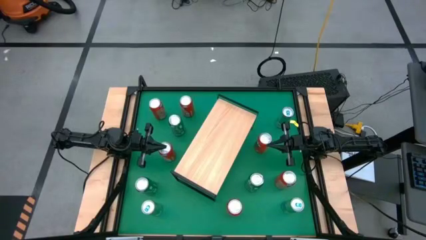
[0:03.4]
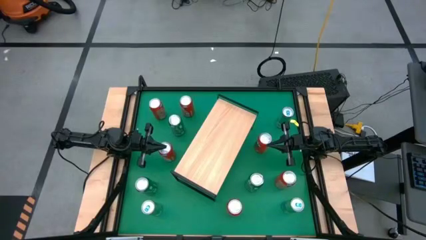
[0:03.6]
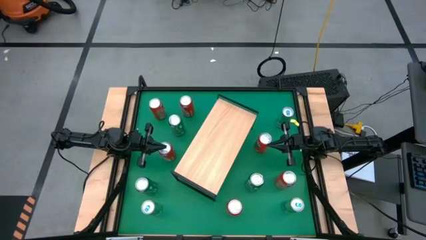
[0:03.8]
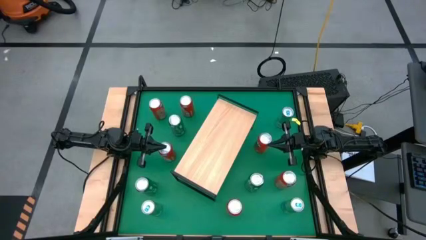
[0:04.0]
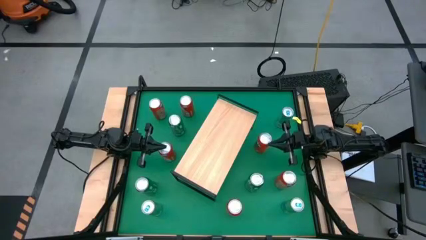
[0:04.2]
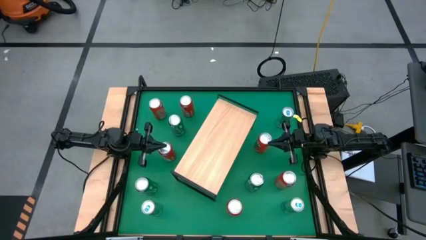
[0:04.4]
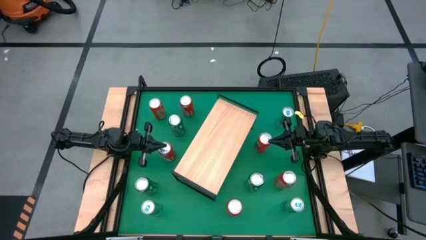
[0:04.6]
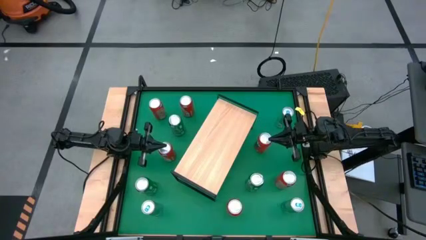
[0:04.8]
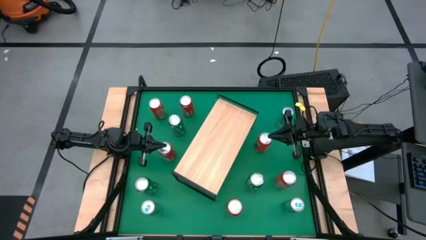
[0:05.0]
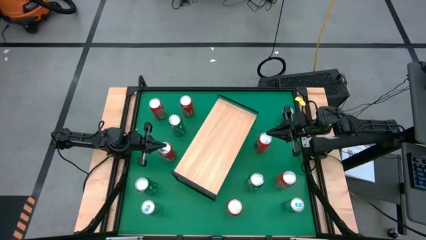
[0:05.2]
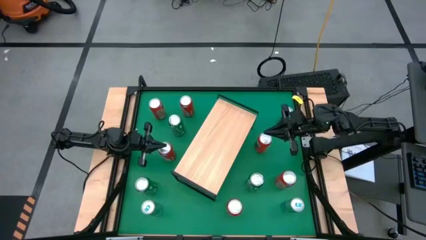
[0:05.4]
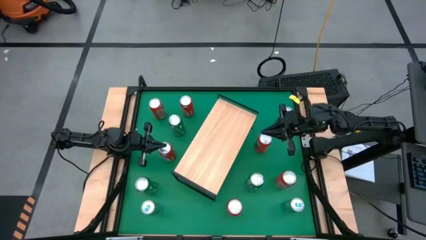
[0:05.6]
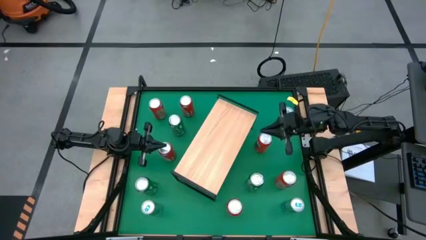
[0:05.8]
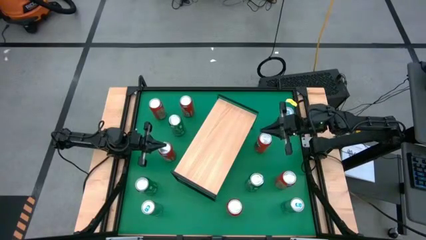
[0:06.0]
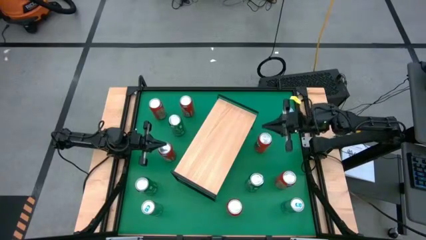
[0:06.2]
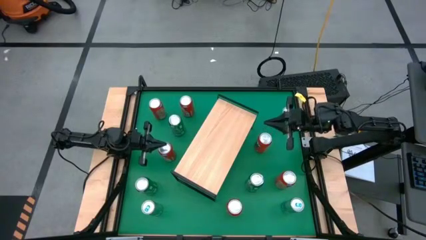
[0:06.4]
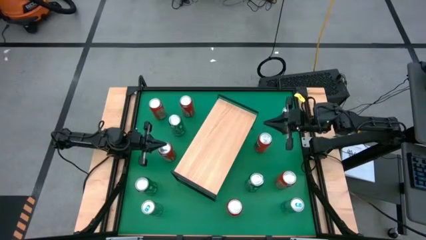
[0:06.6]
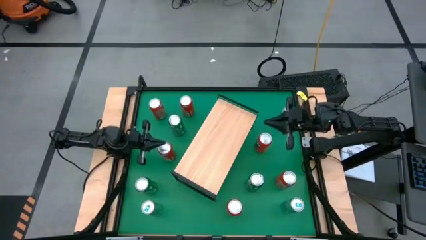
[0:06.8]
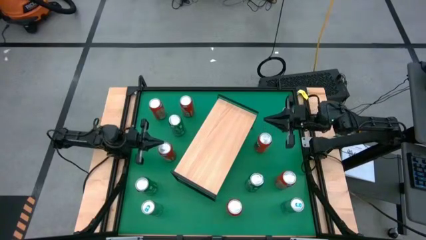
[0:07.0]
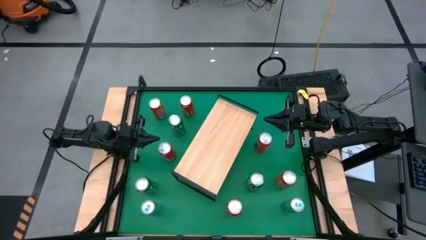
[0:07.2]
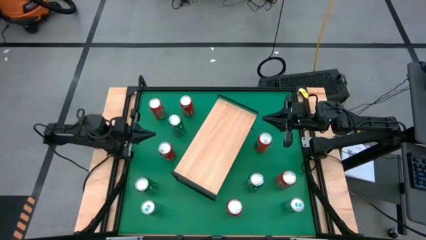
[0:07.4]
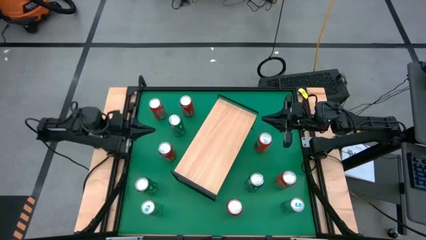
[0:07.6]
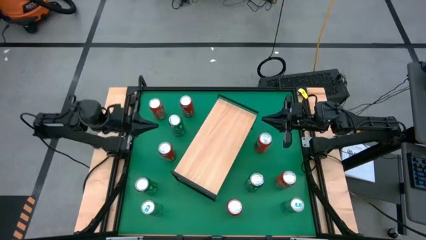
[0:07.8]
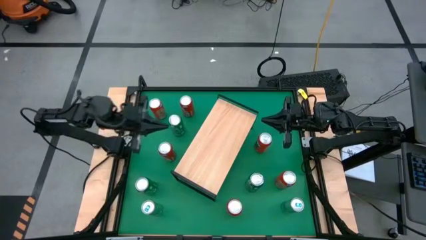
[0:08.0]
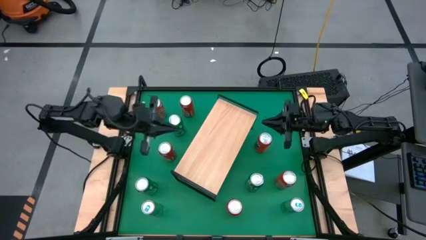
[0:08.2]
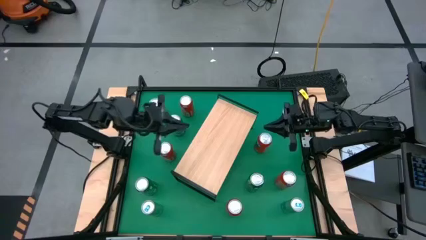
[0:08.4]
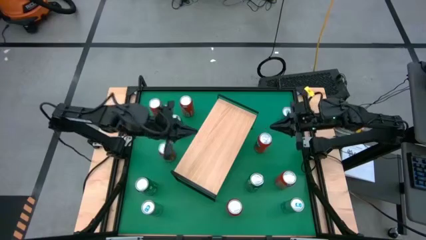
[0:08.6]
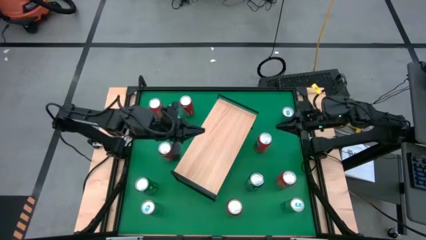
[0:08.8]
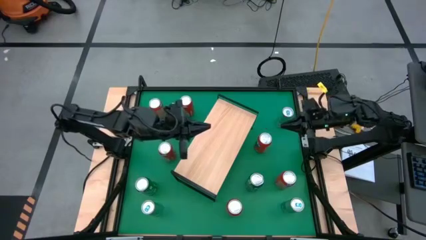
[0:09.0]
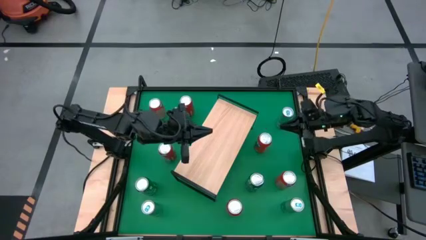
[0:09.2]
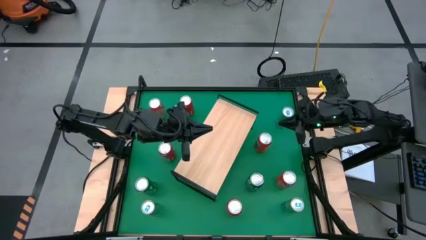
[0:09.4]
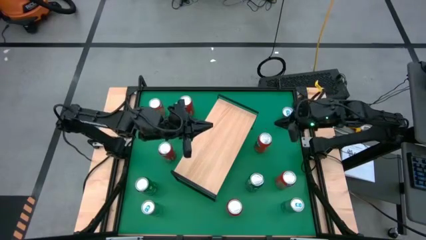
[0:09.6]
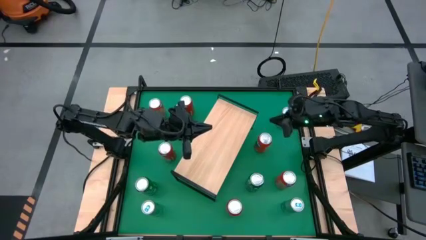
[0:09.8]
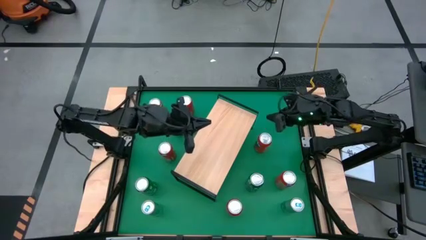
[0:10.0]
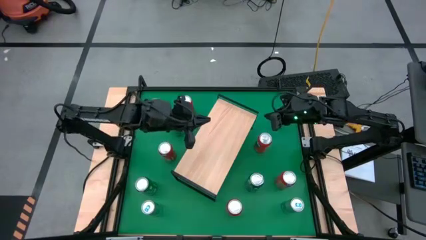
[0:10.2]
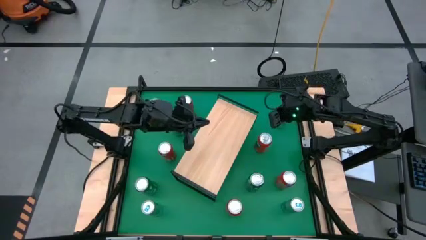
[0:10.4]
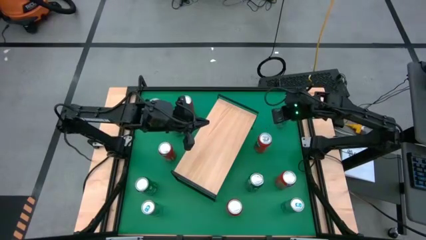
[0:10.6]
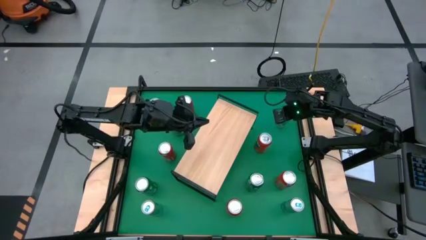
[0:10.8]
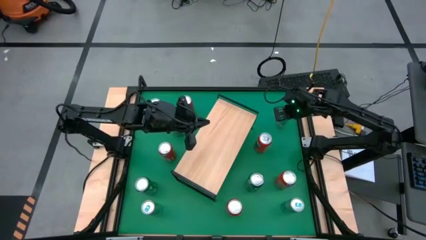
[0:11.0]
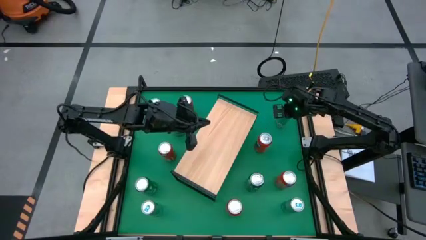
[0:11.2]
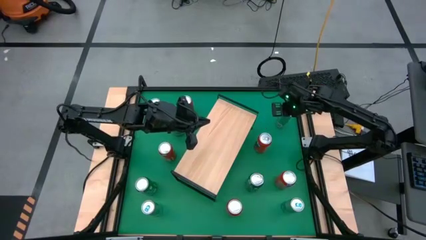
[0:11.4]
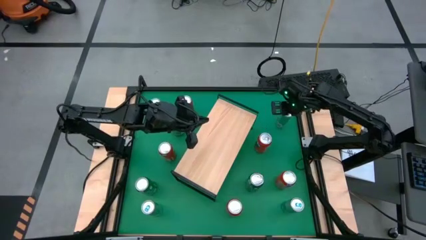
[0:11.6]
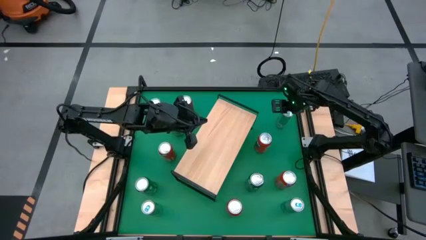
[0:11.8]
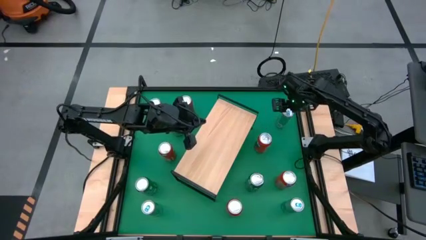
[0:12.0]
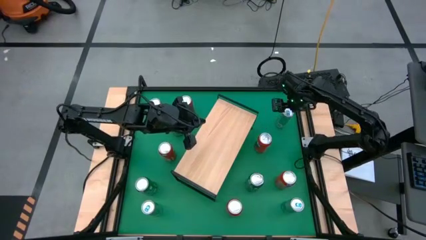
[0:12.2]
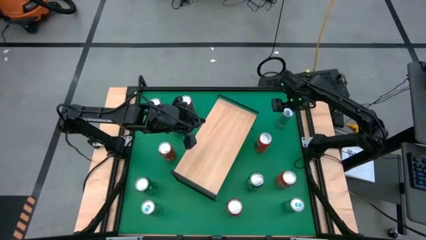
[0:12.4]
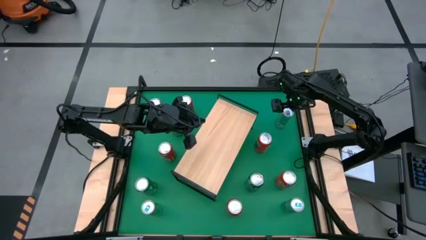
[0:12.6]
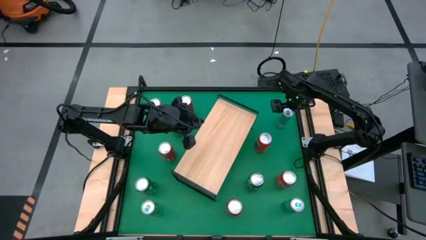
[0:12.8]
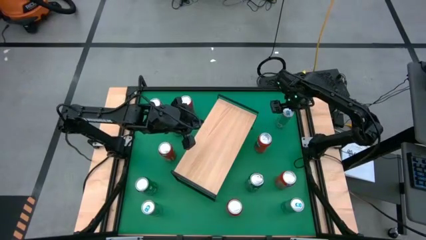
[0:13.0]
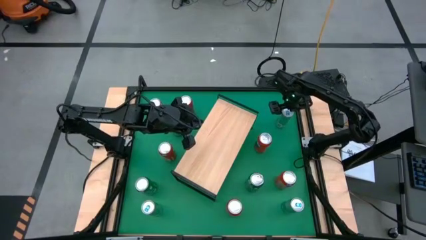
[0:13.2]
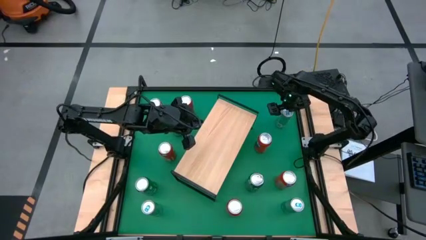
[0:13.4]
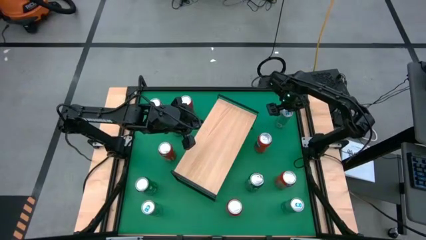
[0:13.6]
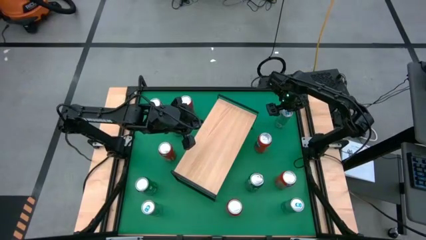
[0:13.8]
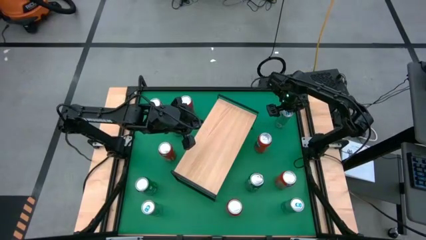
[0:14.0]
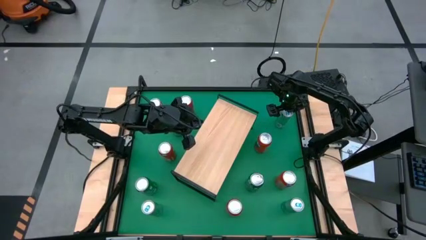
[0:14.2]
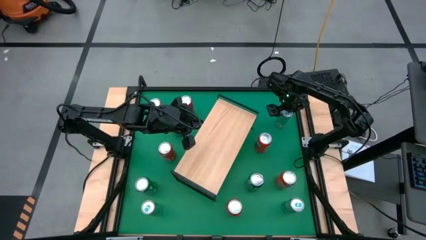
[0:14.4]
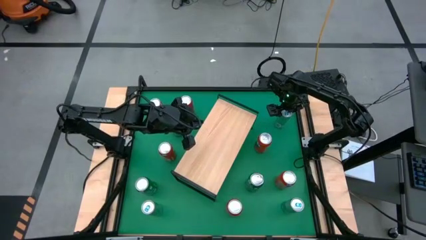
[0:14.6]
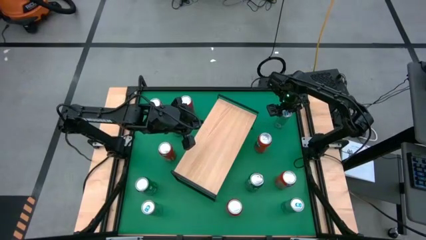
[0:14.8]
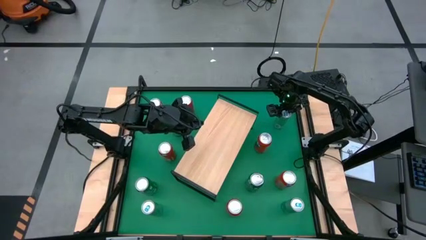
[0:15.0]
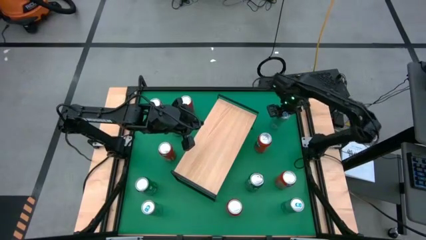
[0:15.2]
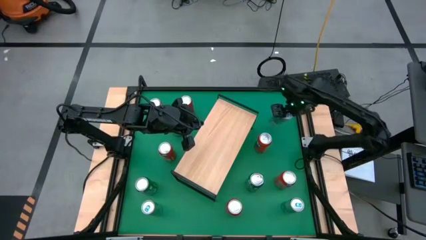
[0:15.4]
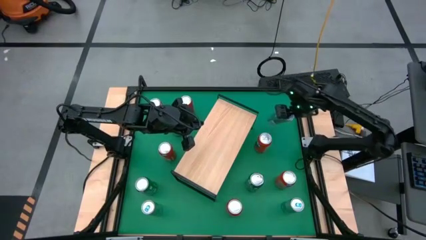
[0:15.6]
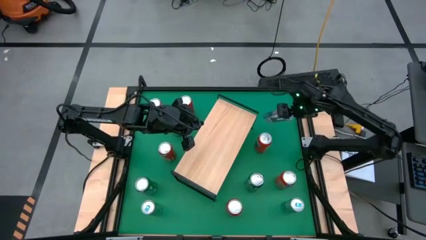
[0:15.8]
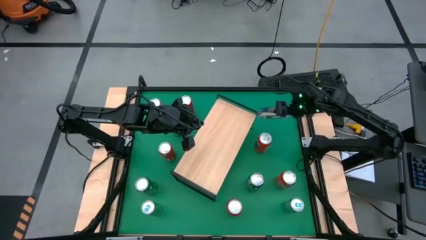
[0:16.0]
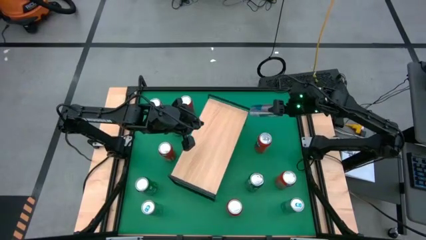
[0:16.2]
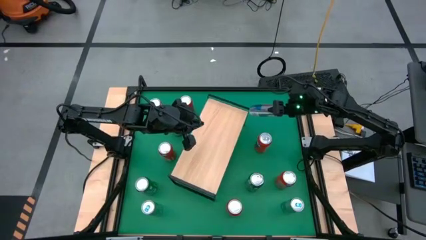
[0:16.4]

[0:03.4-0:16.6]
Task: Sort soda cans
Put the blue soda can on the shelf

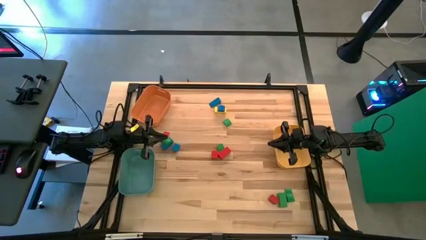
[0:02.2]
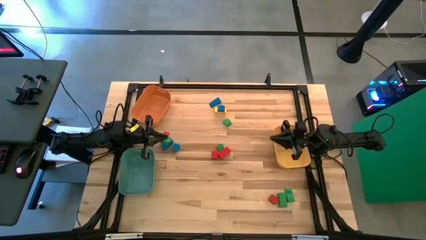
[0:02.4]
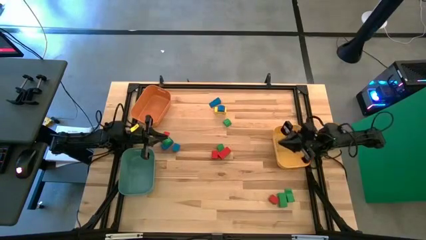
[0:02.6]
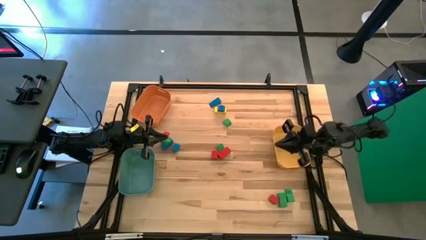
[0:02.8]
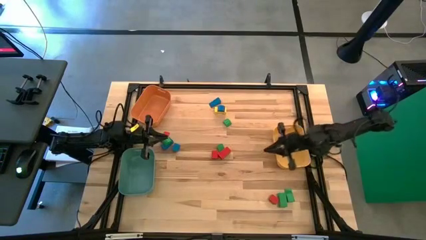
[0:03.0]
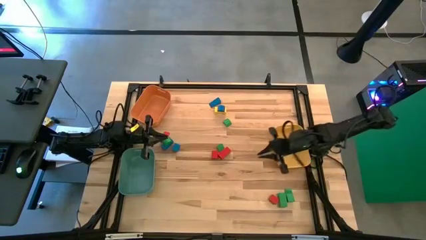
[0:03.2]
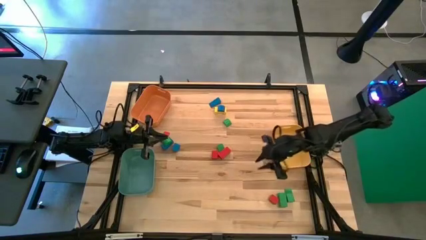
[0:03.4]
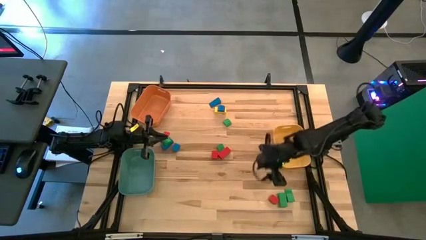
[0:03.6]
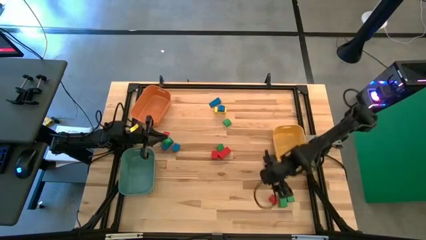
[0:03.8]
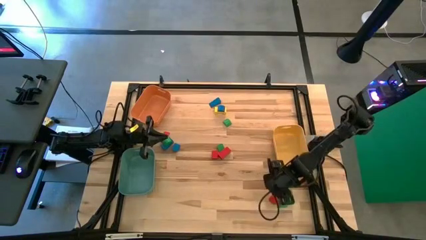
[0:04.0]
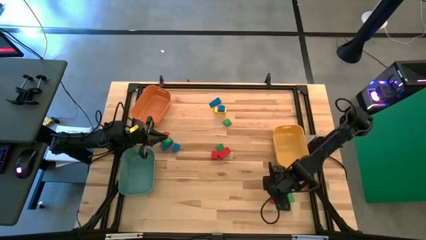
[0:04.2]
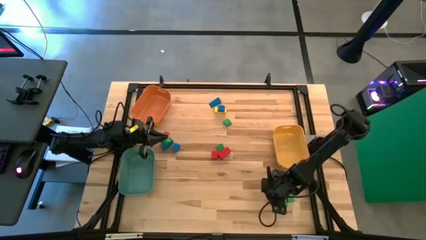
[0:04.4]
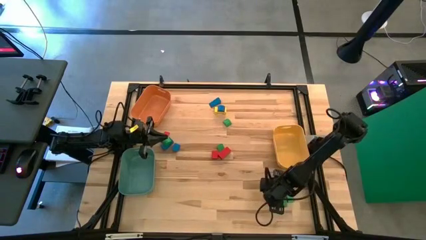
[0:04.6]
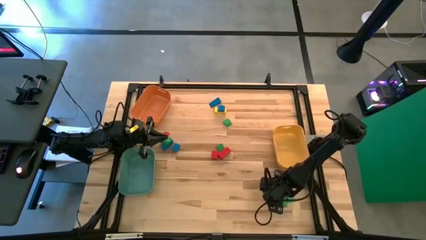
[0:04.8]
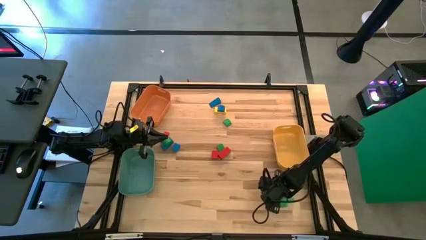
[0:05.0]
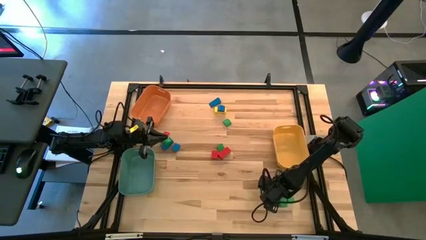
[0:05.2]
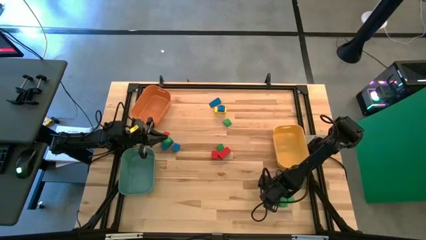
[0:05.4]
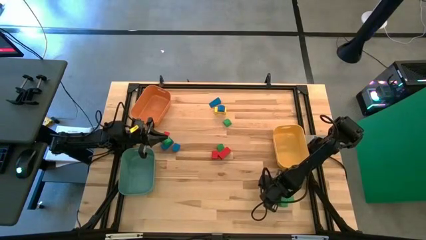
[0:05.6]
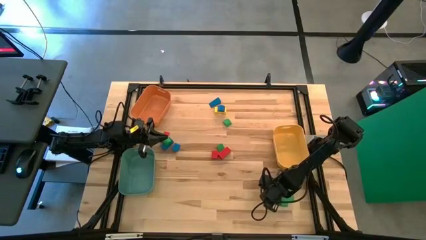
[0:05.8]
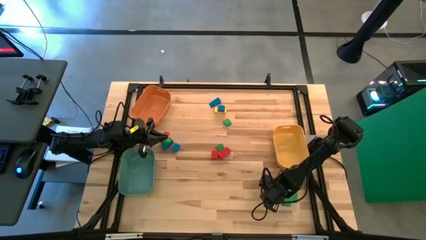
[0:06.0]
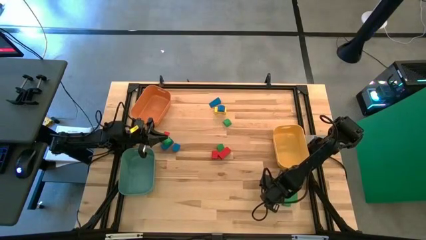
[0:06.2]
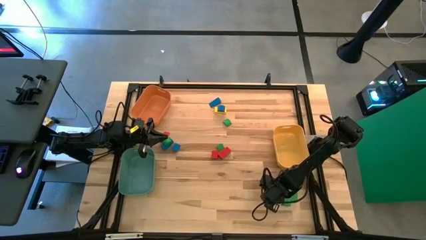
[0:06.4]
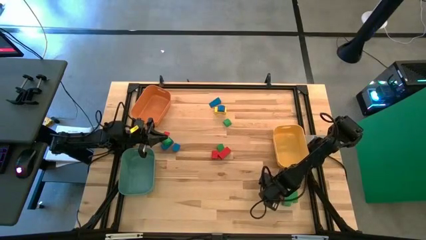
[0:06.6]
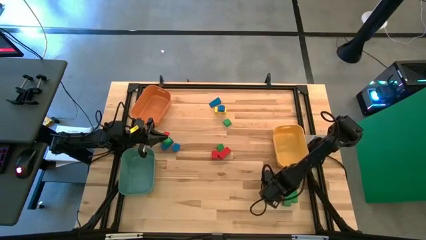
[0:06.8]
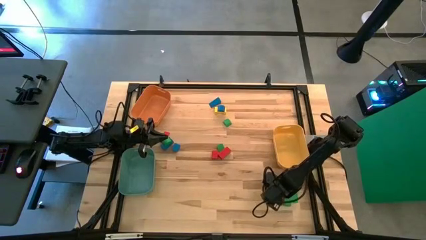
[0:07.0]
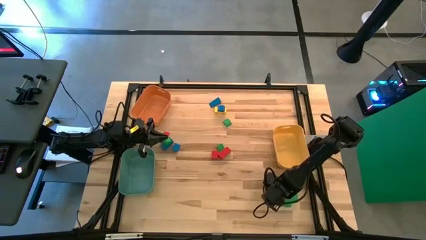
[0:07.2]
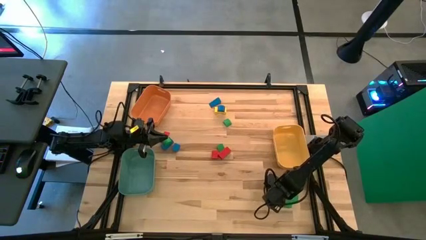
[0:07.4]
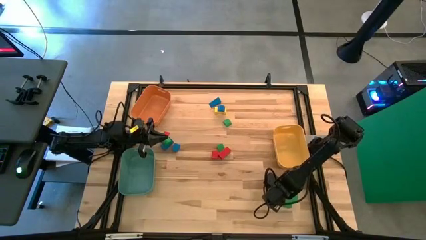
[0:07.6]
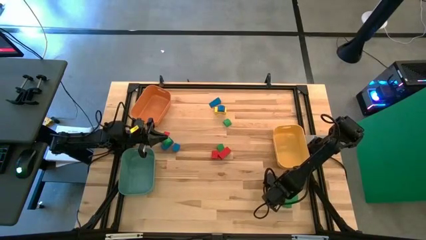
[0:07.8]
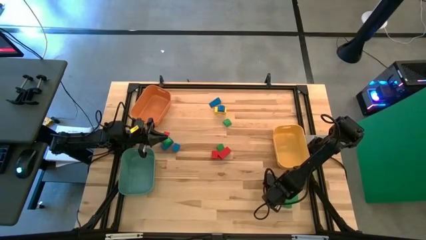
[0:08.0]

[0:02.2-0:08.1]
Task: Sort blocks by size
Put the red half-circle block into the yellow bin
